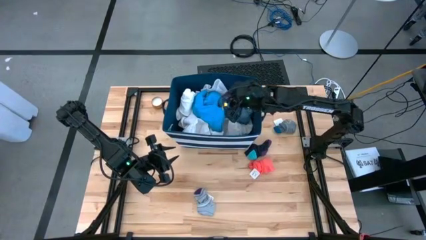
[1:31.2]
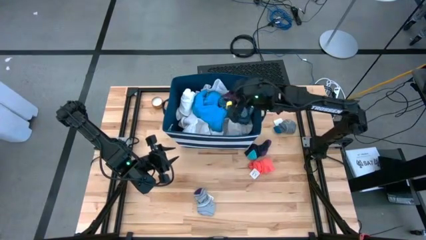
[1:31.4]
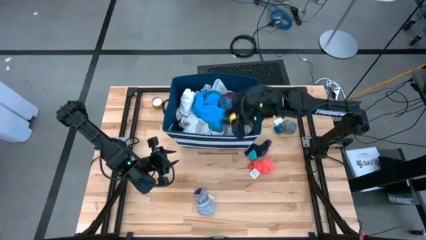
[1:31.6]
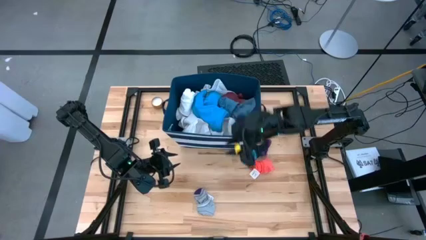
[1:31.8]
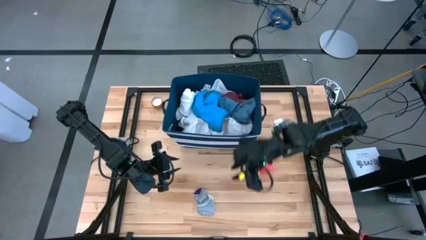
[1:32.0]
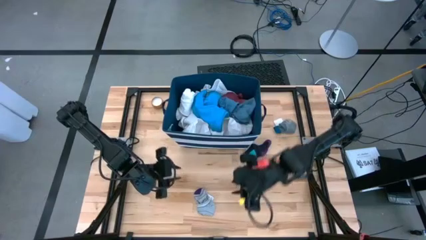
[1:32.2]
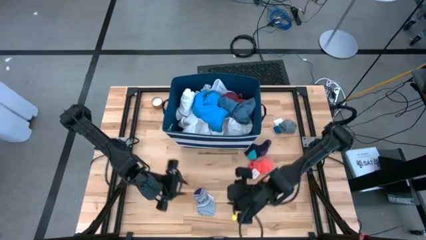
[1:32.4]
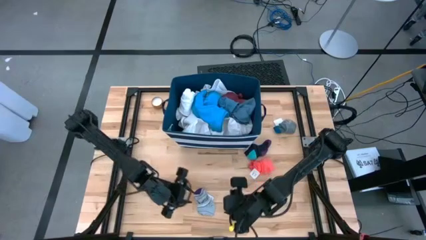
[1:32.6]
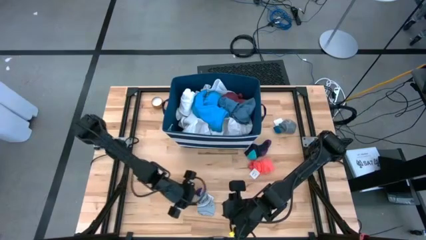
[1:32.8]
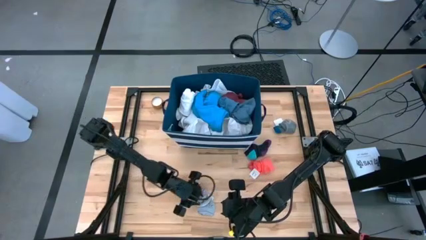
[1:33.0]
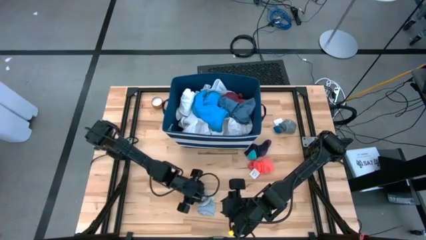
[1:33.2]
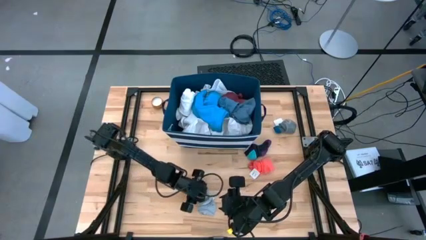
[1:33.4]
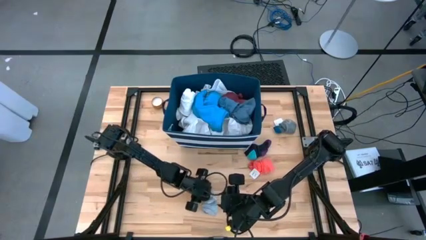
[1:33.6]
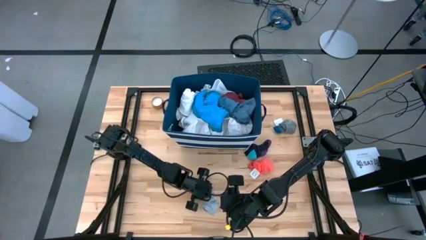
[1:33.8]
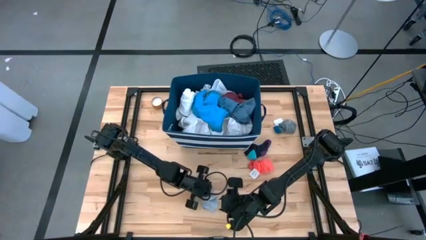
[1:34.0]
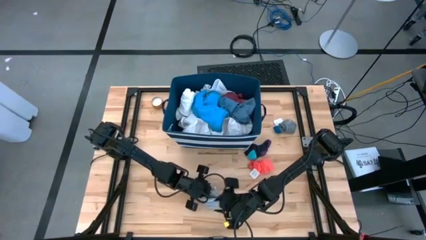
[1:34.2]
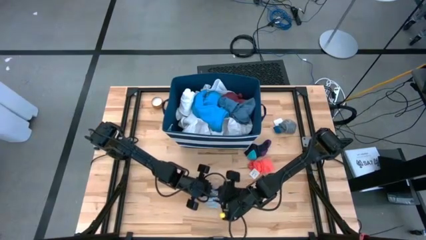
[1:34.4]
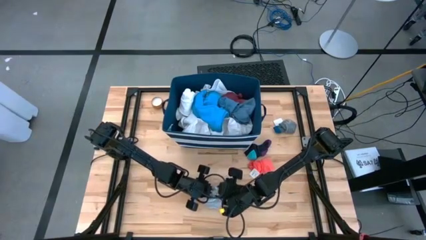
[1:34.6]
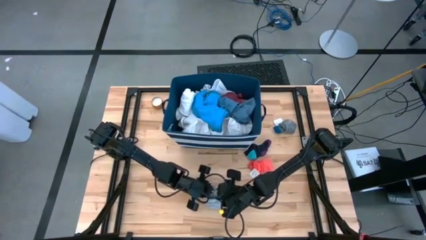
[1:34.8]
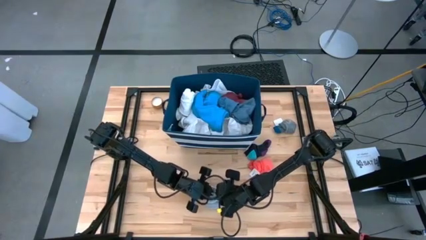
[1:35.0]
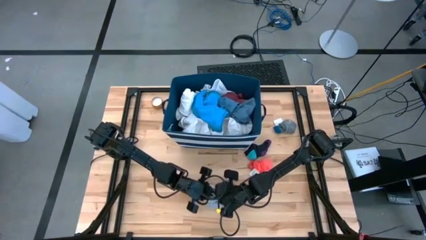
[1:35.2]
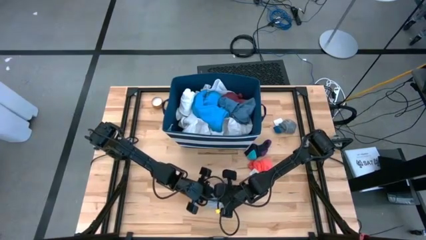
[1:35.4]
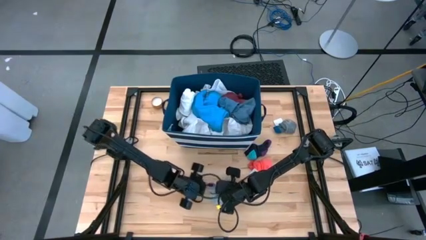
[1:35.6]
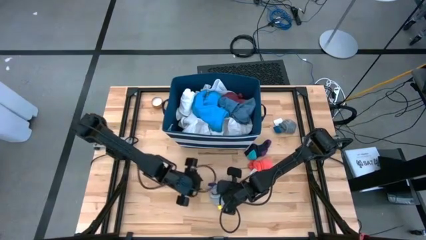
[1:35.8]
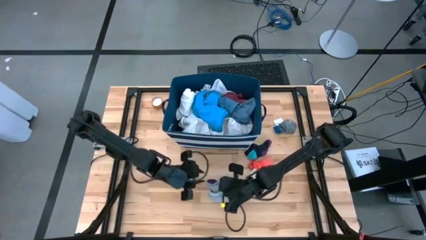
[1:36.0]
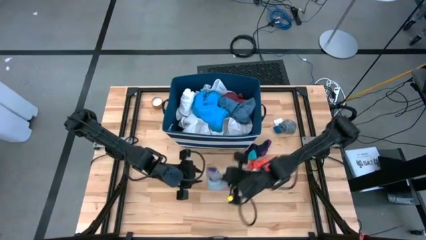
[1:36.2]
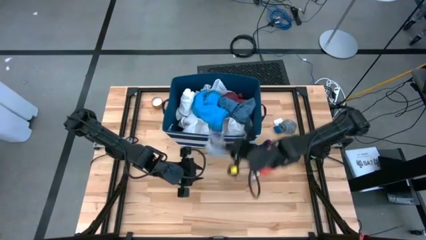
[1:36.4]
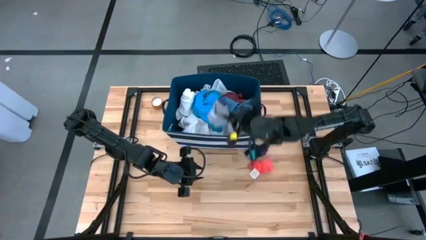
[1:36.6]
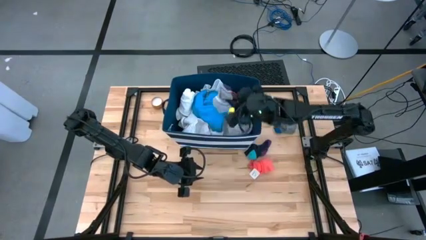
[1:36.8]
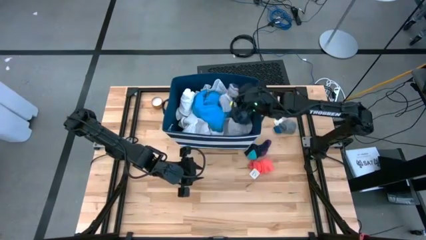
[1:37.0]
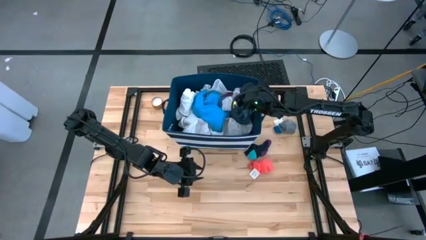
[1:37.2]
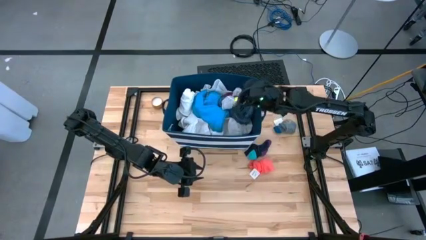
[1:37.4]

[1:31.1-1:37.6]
Task: Sort clothes
Put the gray and purple socks into the white and blue laundry organizer

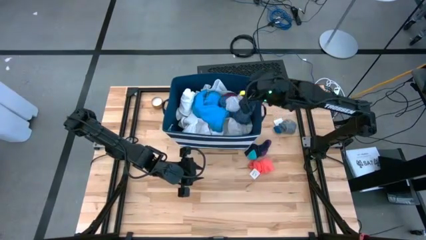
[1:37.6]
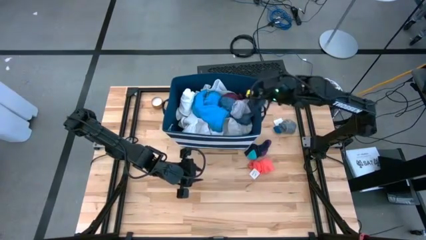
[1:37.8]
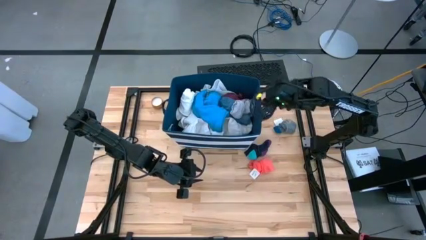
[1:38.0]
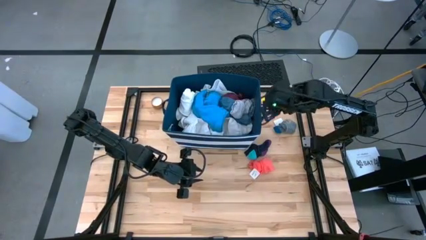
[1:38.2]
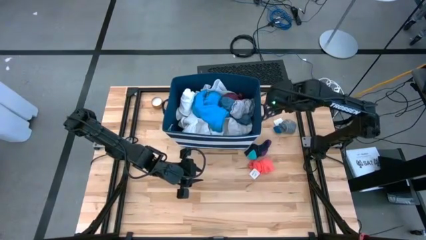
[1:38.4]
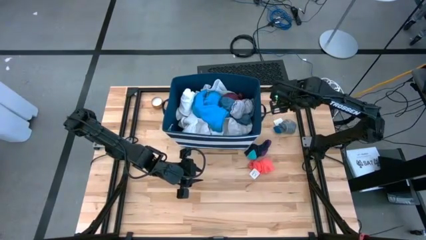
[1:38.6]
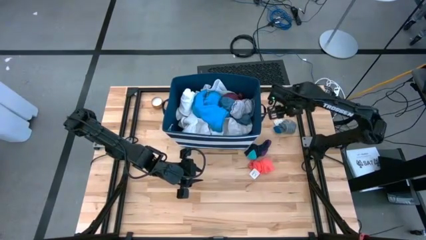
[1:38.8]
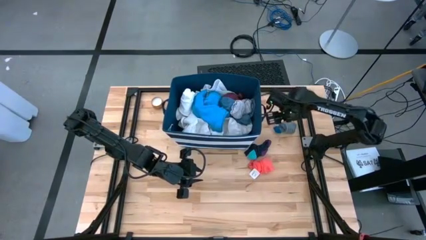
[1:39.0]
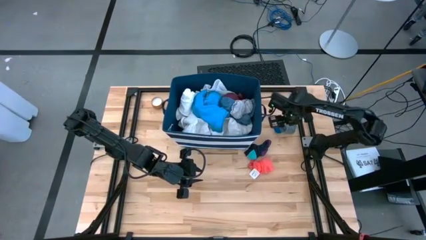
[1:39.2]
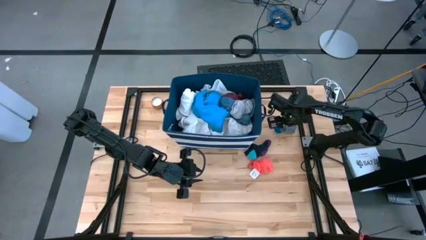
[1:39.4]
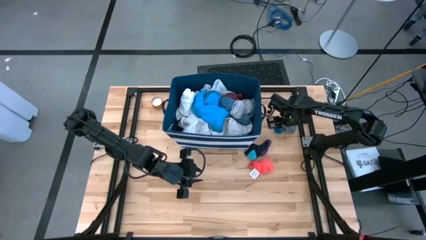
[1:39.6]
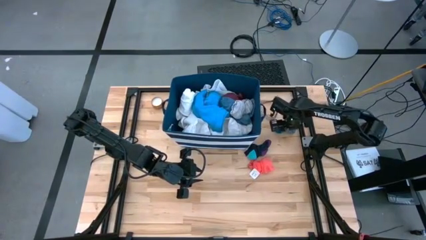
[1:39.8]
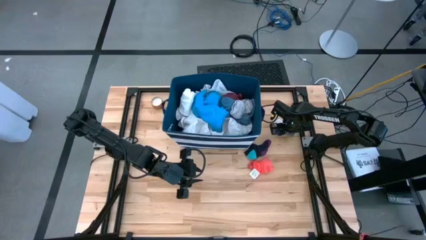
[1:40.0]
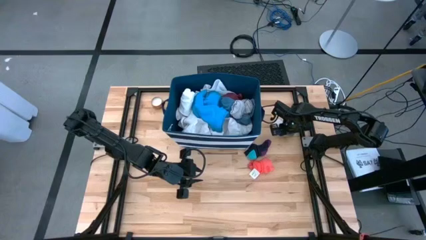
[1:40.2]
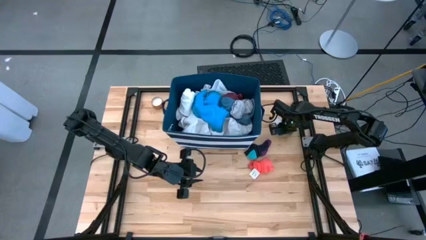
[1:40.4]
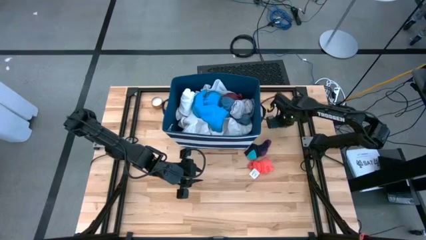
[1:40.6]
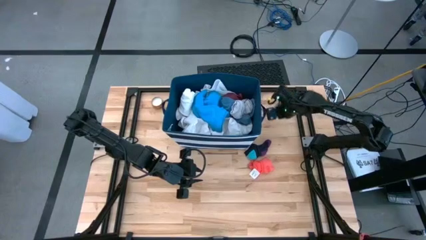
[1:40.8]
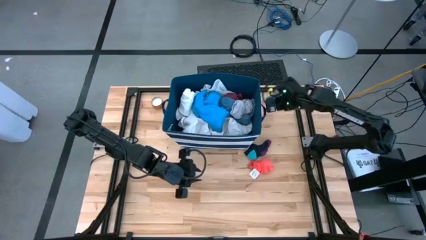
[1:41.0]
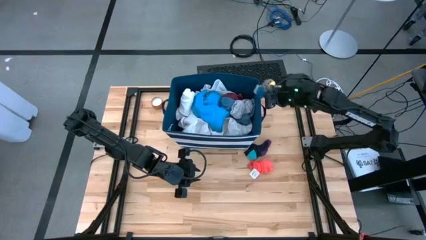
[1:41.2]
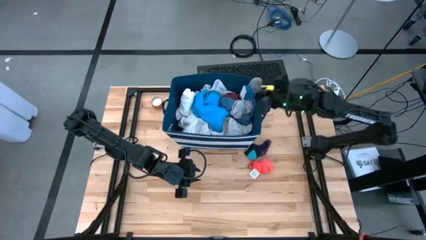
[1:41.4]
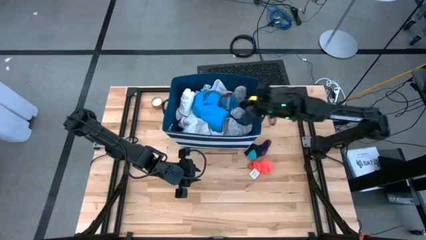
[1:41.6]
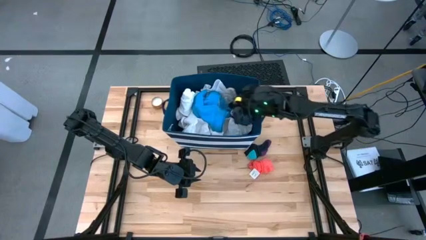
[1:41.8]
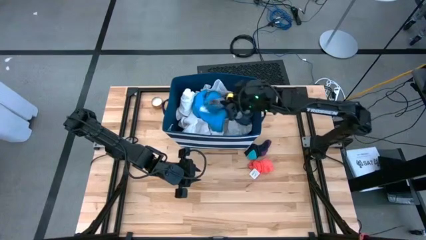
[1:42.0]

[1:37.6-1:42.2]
Put the gray and blue socks into the white and blue laundry organizer

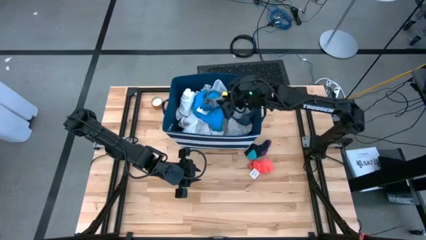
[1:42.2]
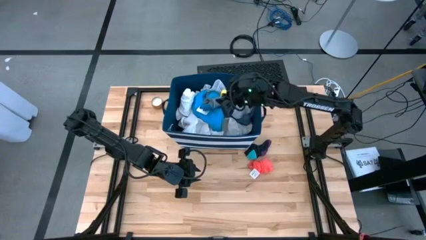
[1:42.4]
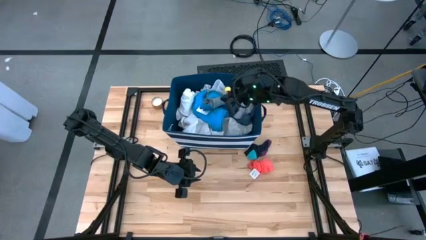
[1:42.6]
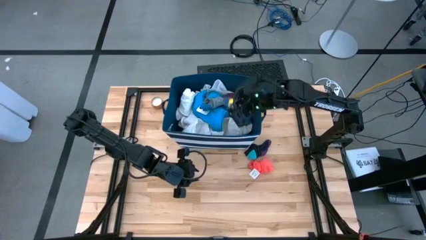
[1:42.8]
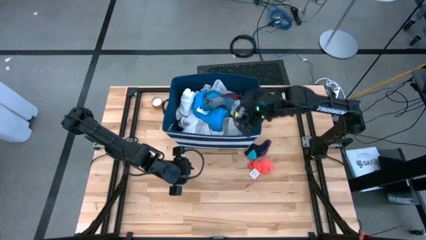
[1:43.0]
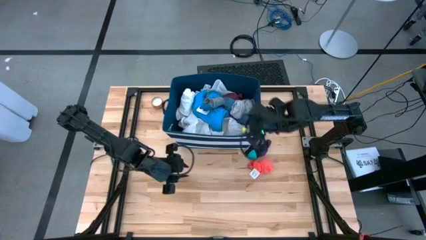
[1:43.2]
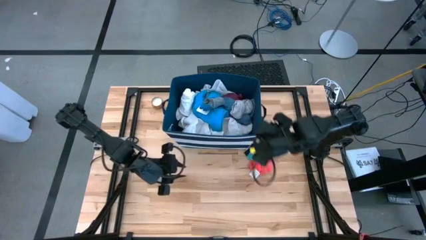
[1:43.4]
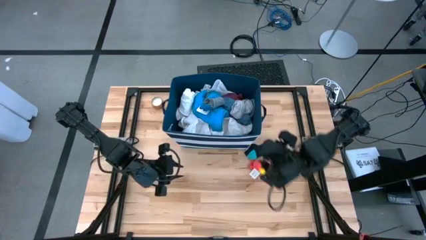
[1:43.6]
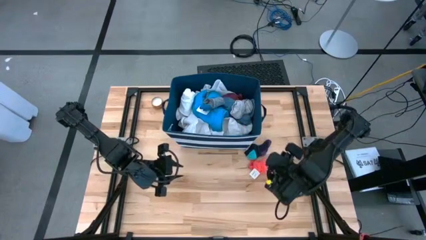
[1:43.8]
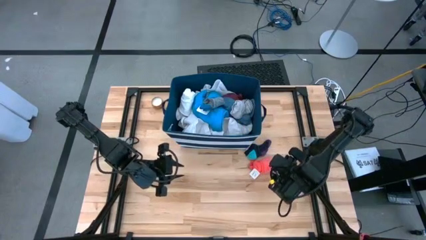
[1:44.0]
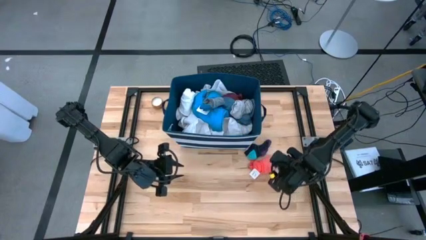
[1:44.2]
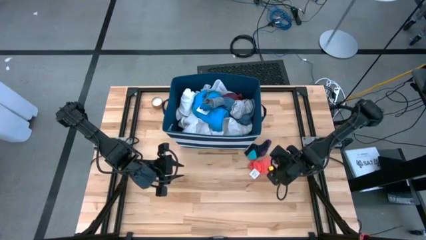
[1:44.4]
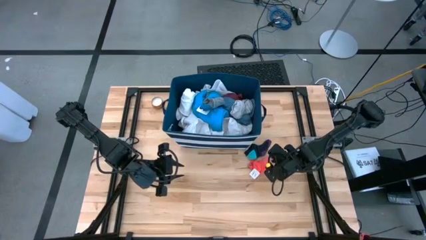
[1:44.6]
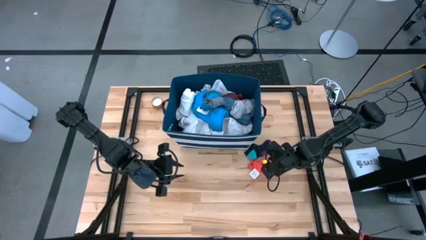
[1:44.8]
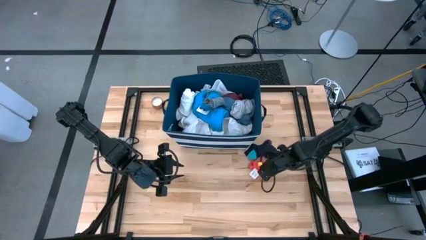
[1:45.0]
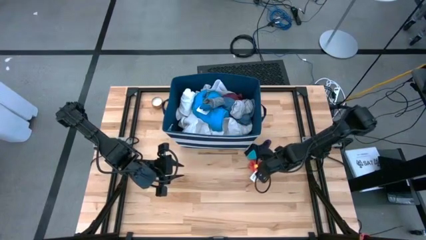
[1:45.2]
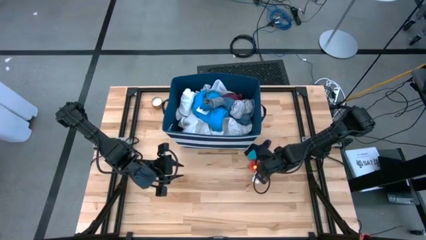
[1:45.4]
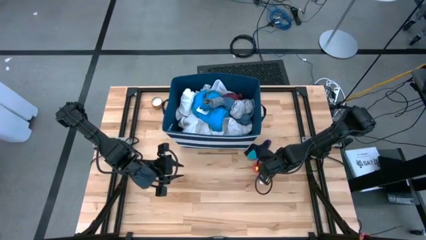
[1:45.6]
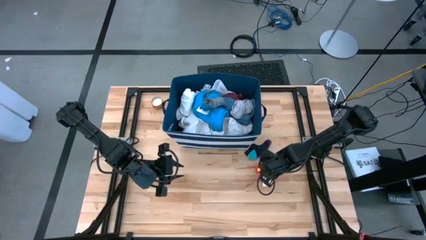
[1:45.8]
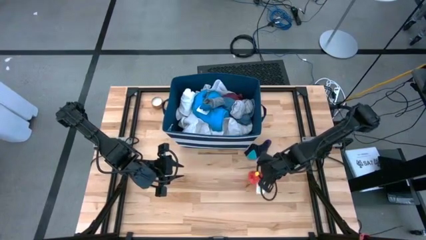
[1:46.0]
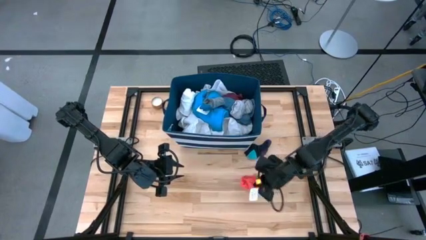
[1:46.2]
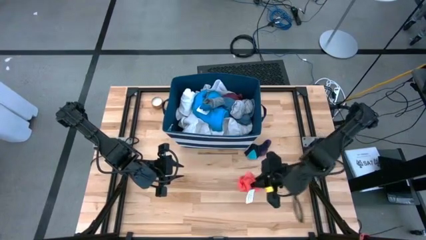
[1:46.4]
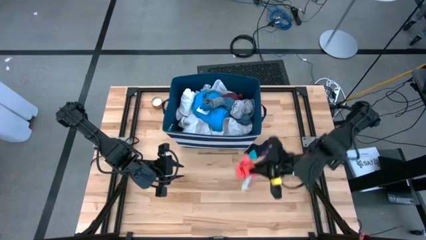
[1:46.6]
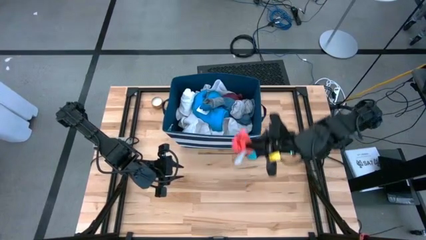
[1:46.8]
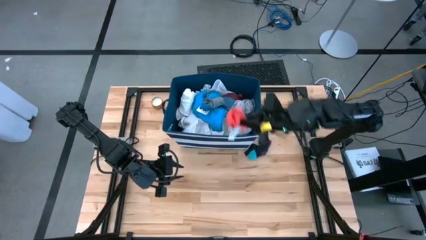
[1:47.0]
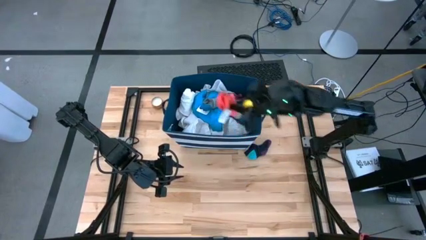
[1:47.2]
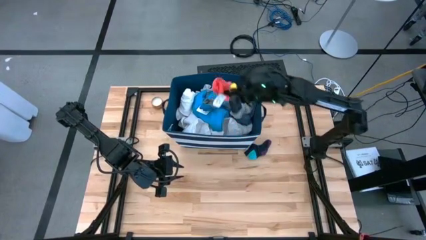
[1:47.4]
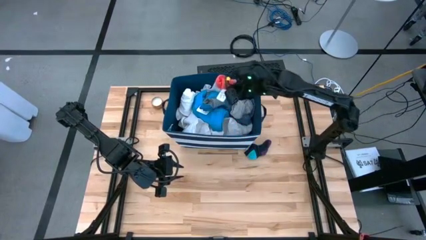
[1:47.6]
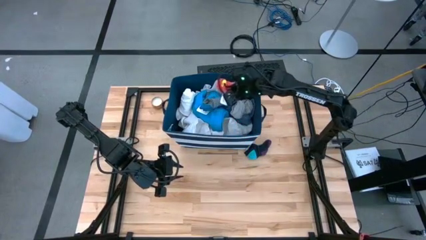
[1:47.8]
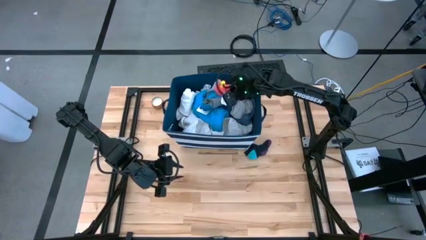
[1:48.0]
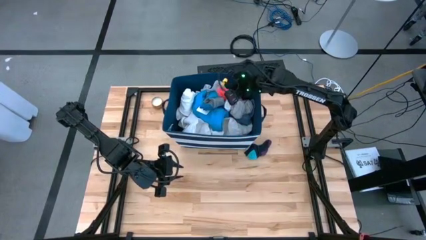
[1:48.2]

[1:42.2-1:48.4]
Put the orange socks into the white and blue laundry organizer
